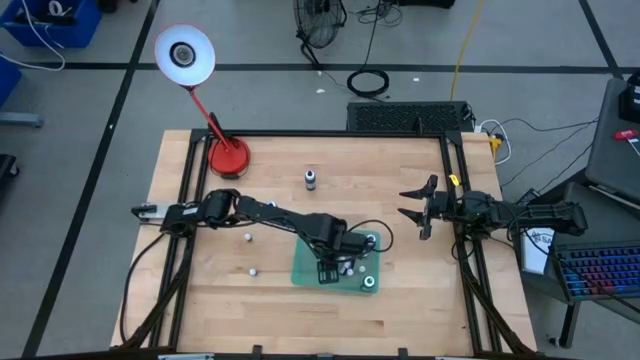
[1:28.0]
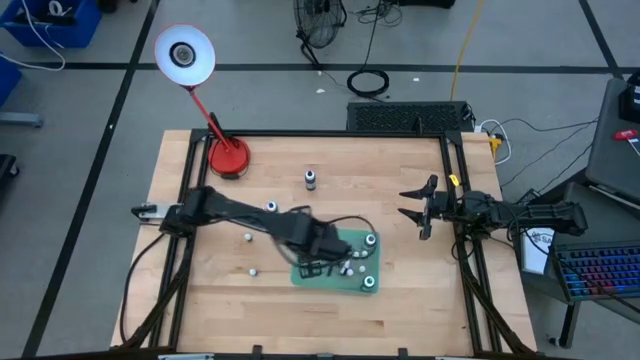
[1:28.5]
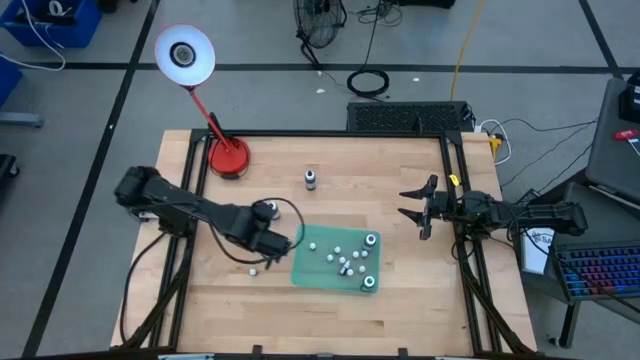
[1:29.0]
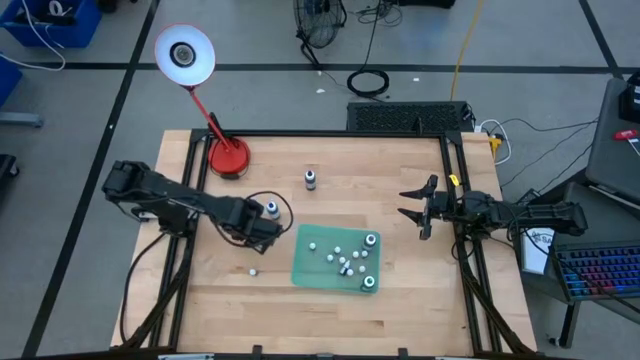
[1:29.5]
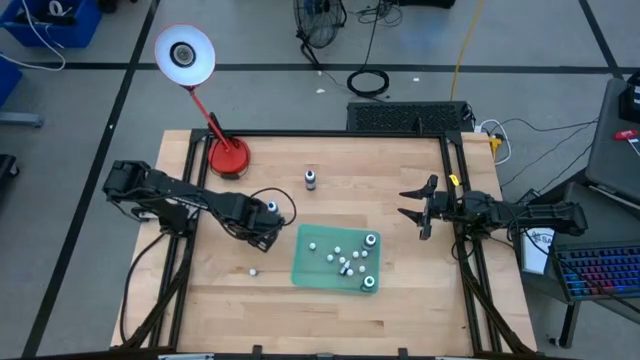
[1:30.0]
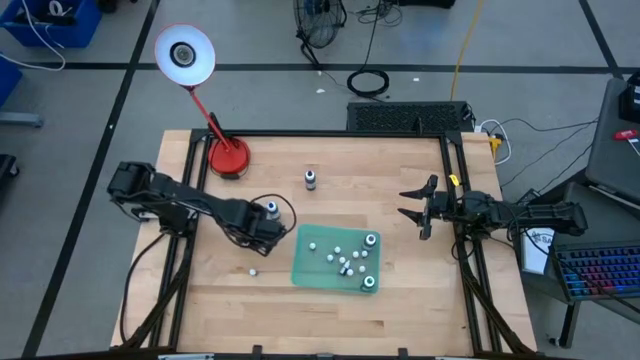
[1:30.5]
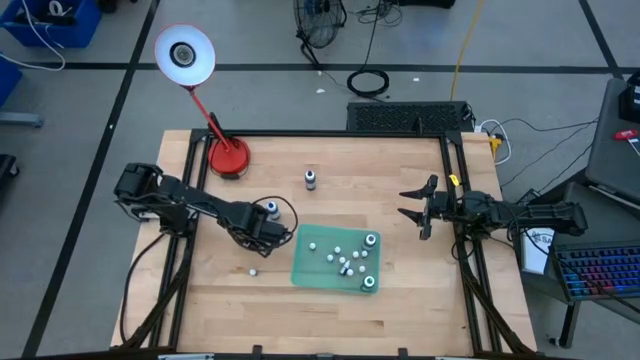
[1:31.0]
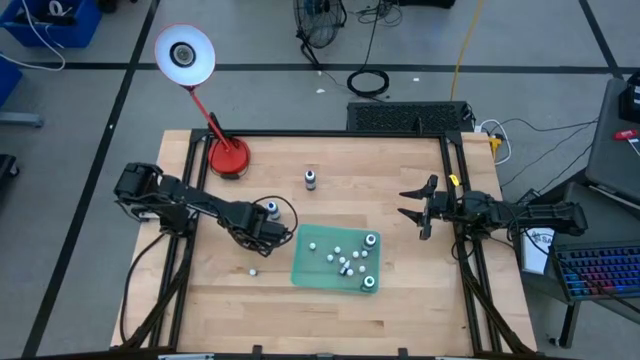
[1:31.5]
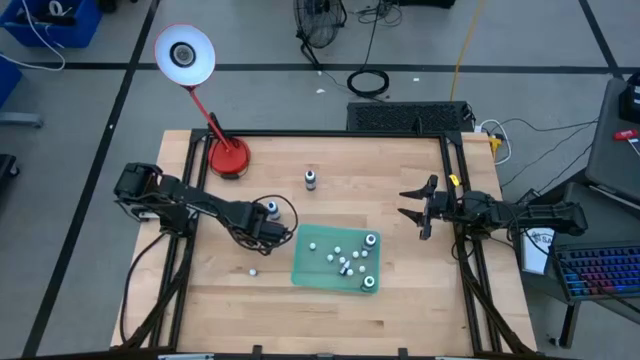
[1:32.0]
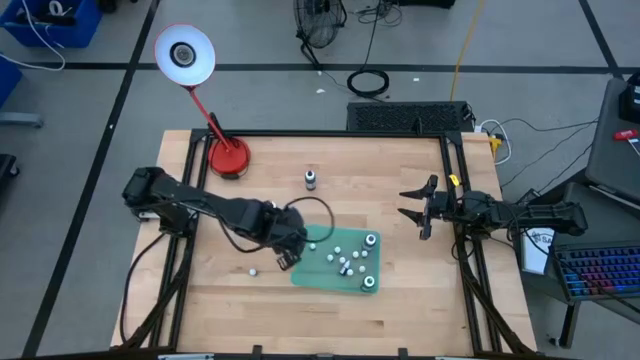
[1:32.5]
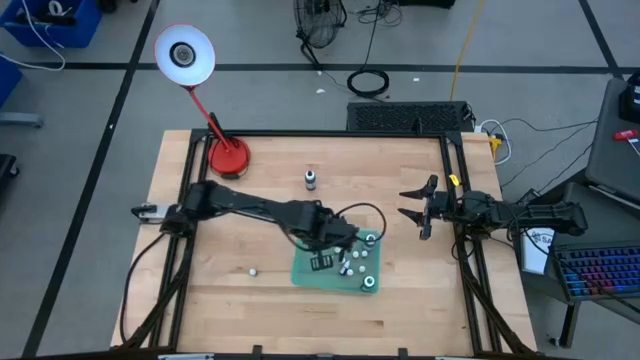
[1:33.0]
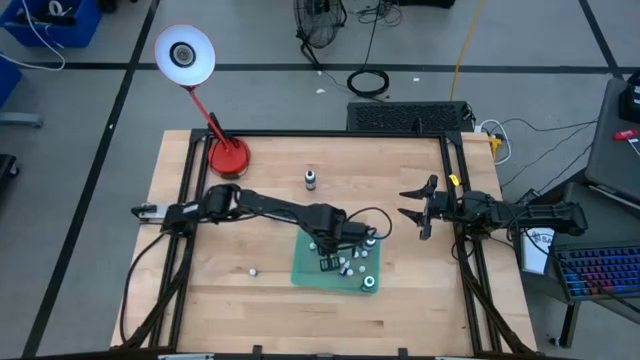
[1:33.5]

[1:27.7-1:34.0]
Task: Pick & Place food coloring
Put the small blue food coloring bottle into the green bin

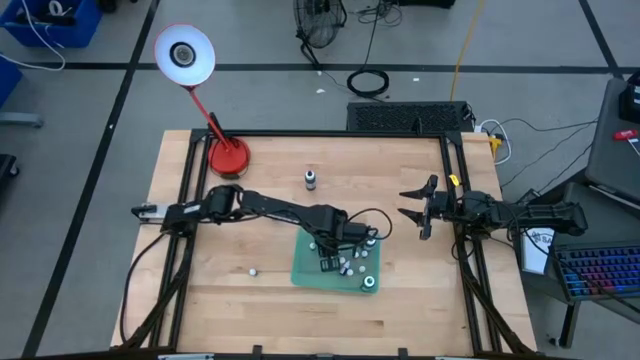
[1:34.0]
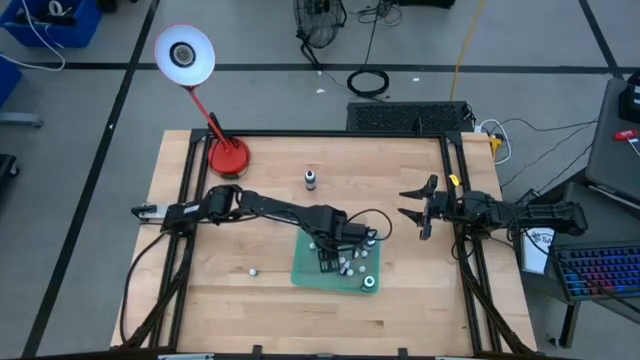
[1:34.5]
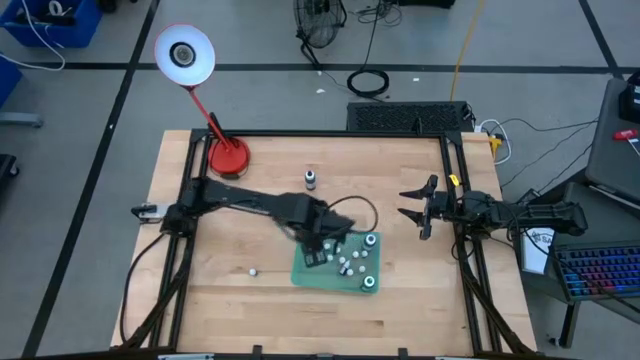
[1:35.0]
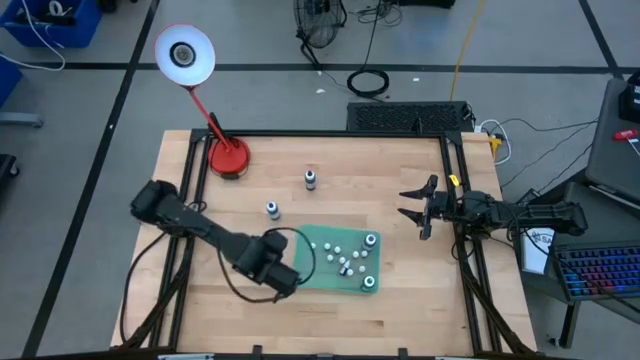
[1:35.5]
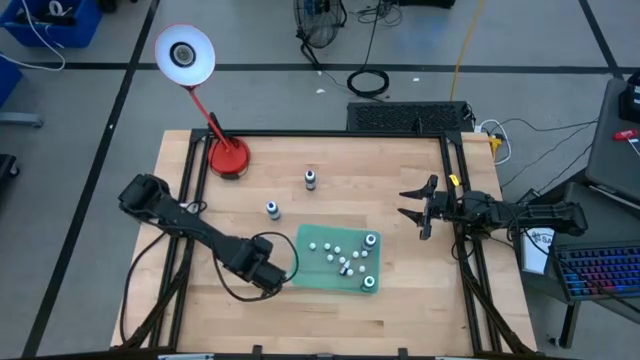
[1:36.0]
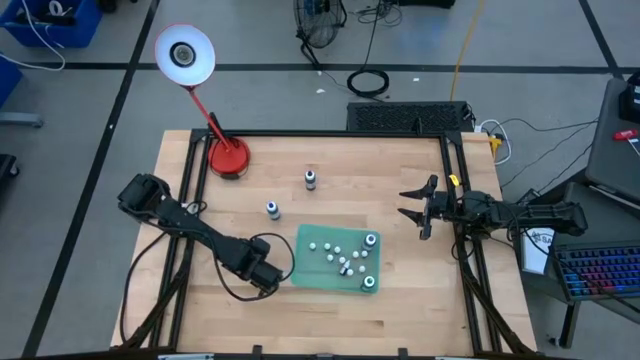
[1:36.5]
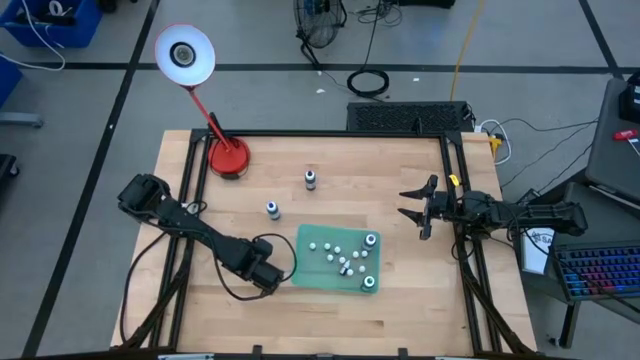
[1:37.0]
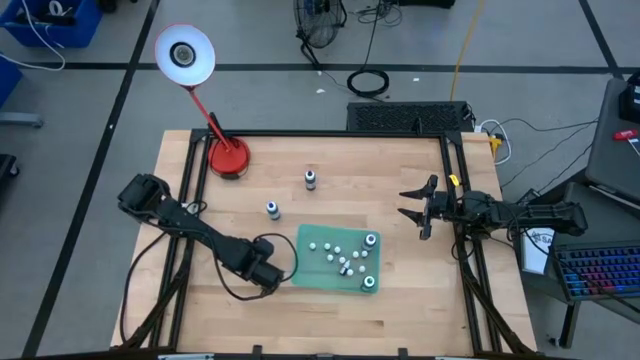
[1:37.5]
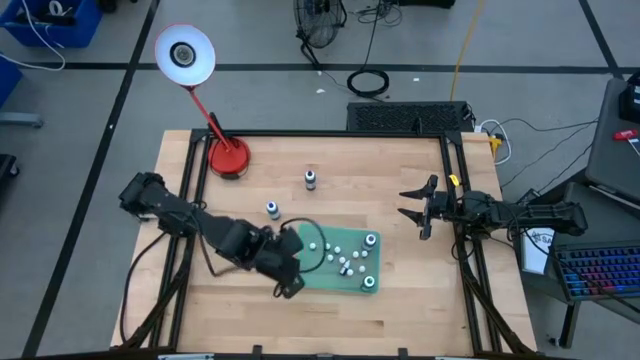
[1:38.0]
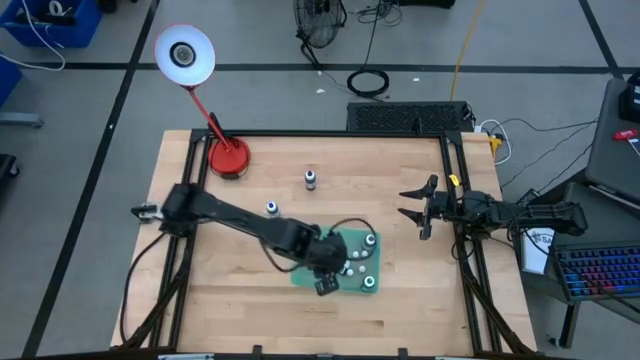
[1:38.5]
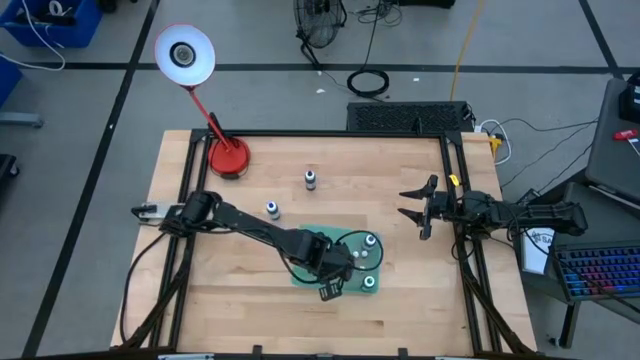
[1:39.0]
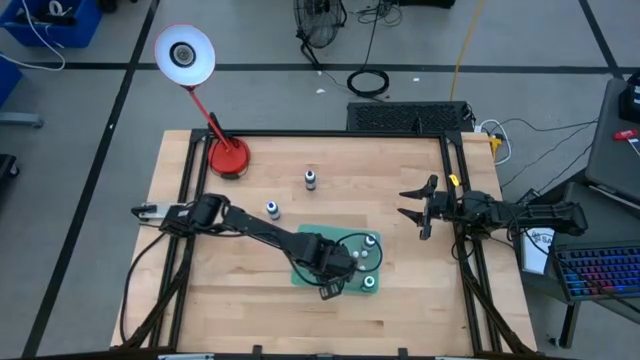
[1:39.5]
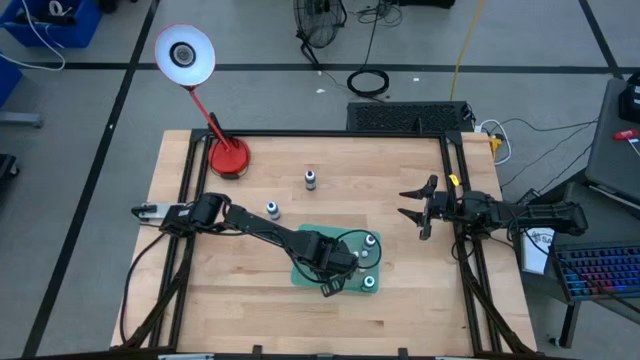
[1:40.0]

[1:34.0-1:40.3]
Put the small black food coloring bottle into the green bin

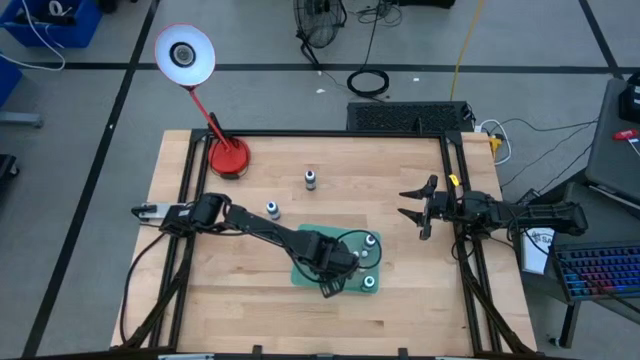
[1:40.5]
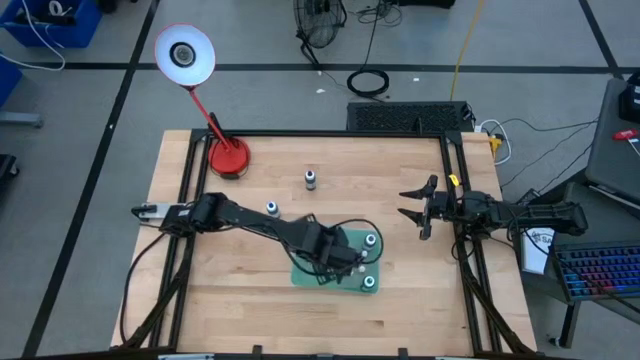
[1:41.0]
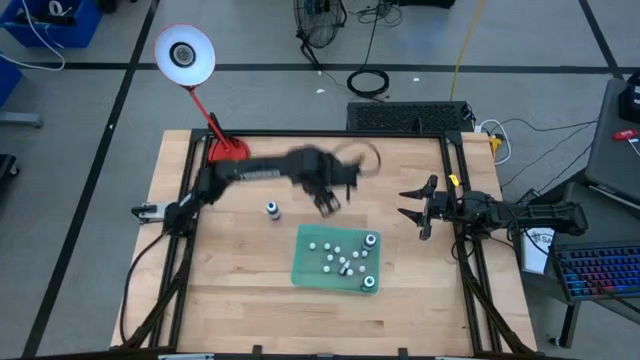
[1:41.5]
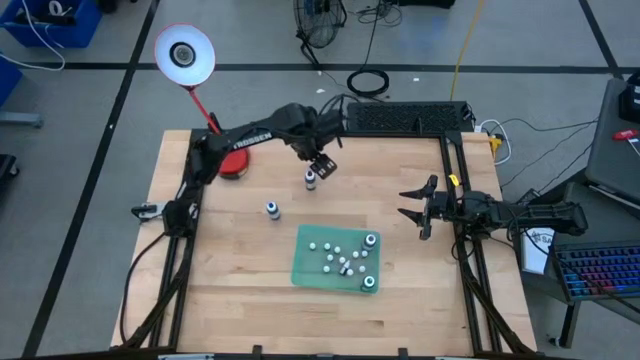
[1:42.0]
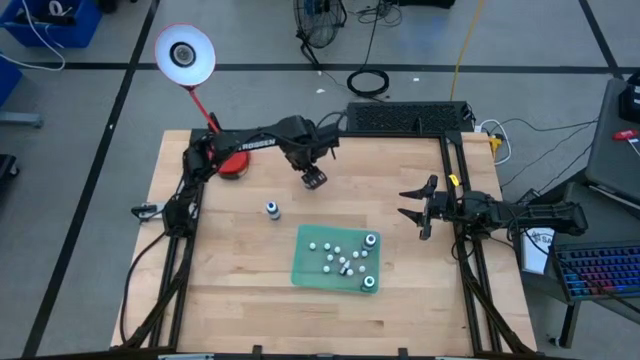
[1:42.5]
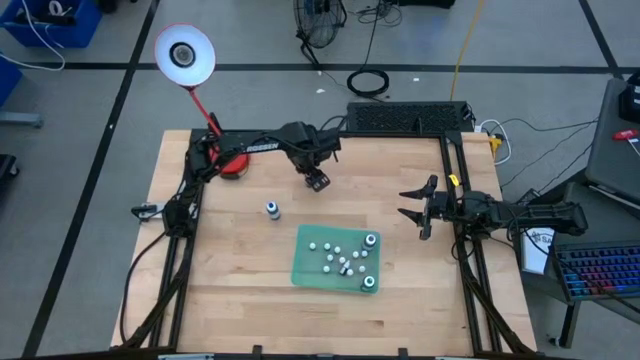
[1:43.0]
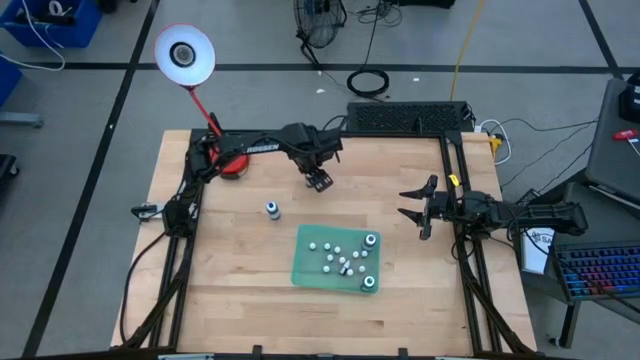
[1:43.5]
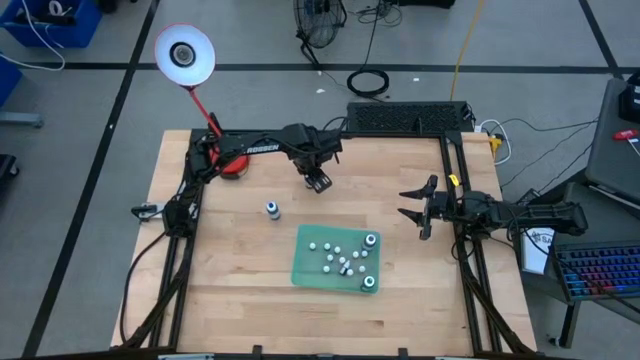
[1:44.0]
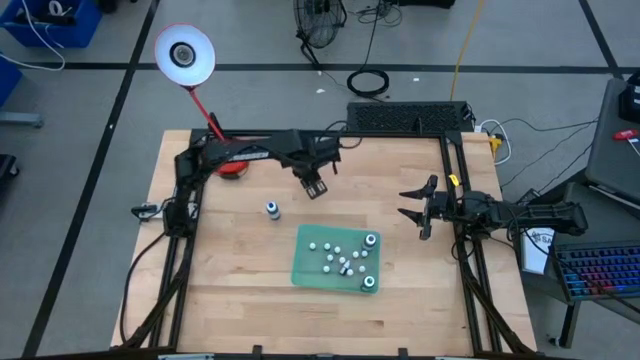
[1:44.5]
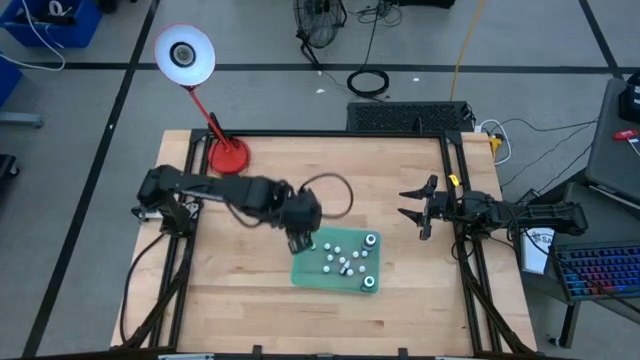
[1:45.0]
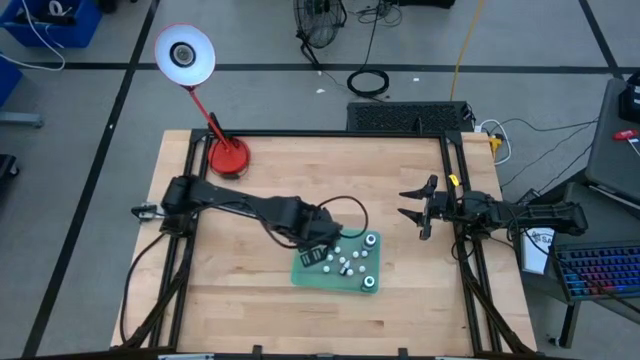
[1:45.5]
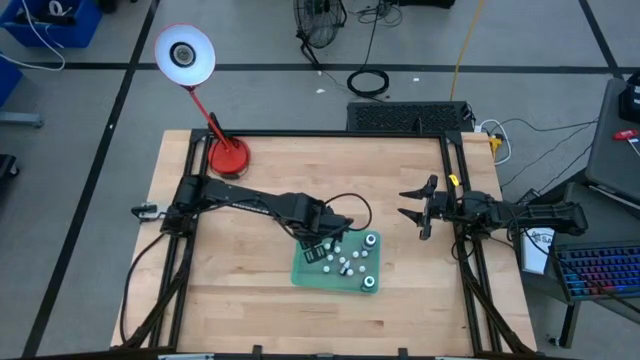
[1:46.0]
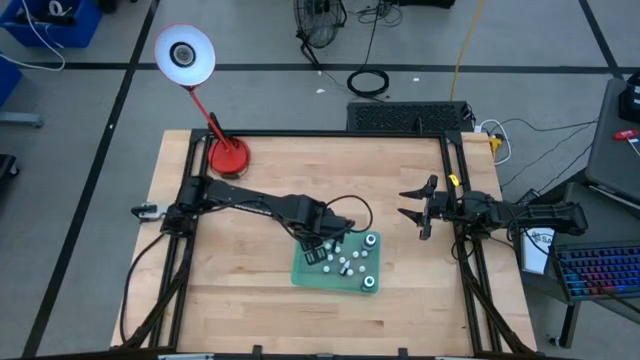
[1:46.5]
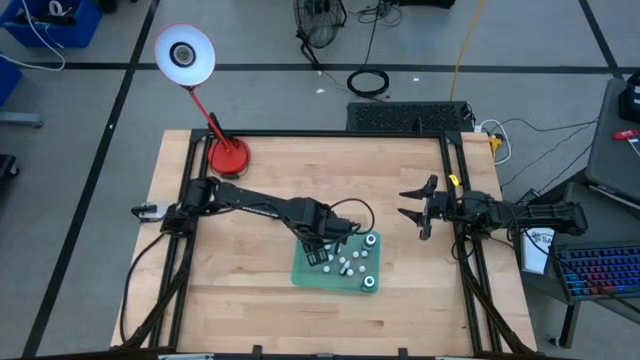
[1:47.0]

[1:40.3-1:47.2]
Put the big black food coloring bottle into the green bin

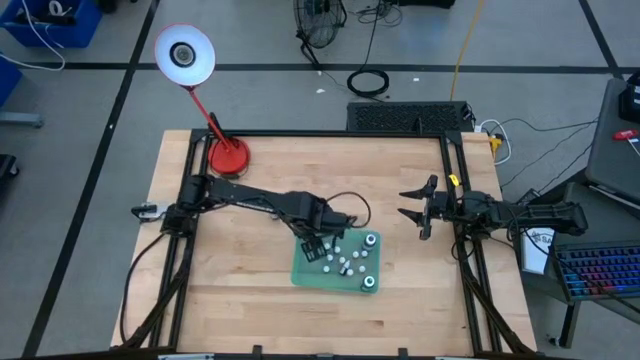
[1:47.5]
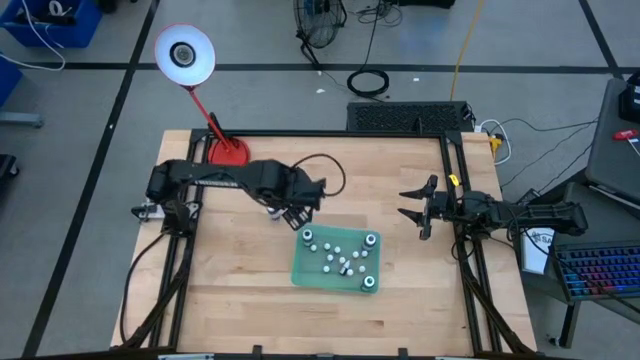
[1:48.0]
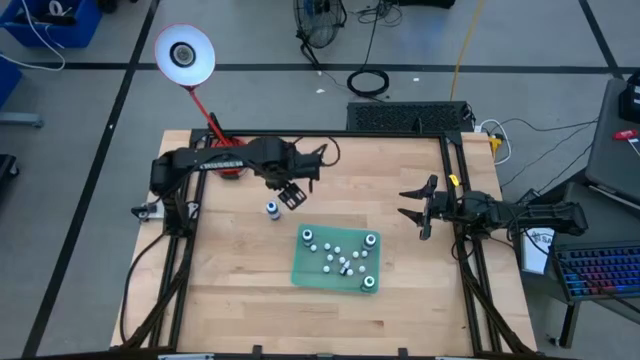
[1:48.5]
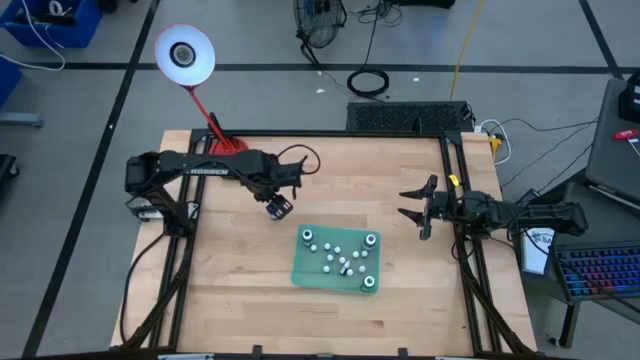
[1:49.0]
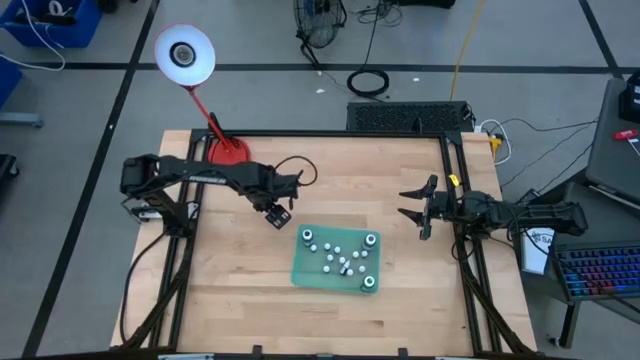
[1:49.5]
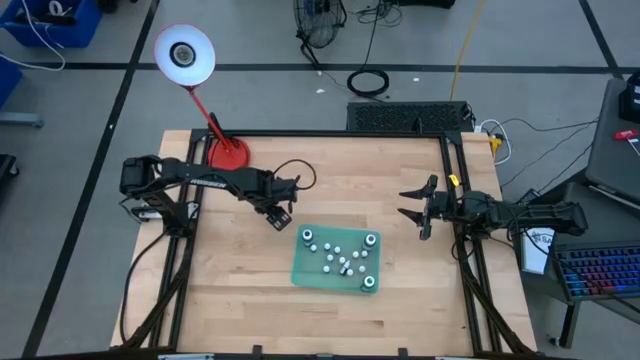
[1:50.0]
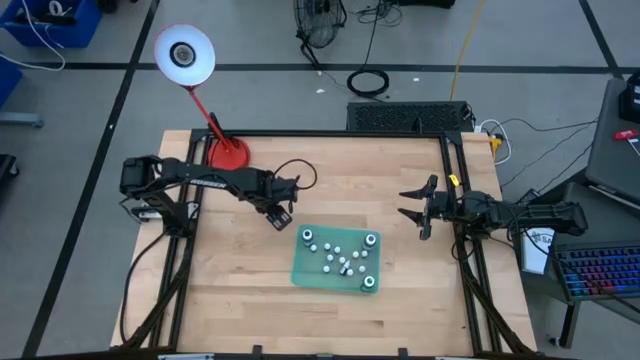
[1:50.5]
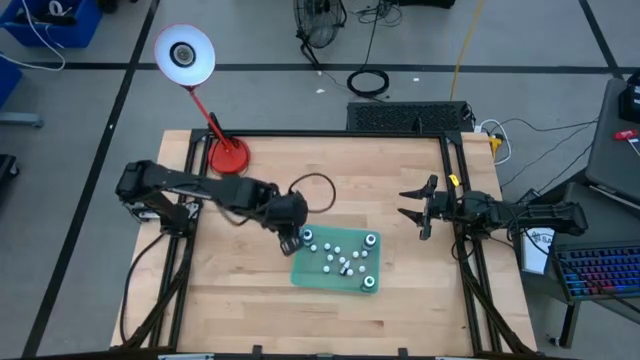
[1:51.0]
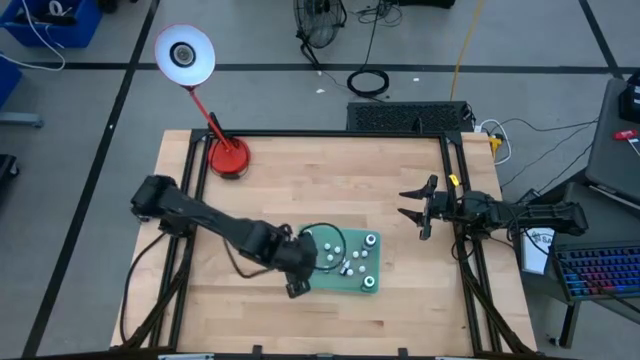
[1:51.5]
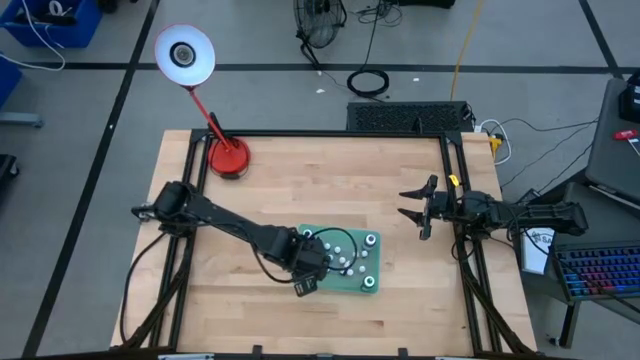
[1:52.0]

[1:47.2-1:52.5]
Put the big blue food coloring bottle into the green bin
